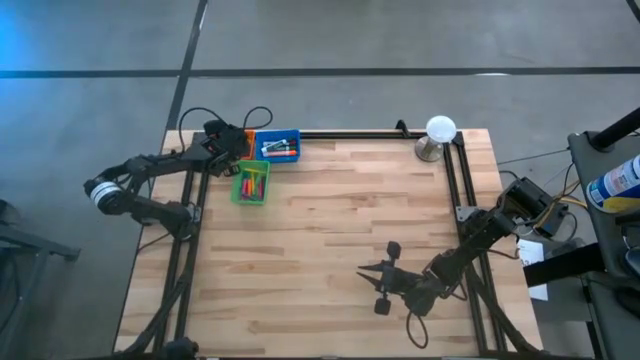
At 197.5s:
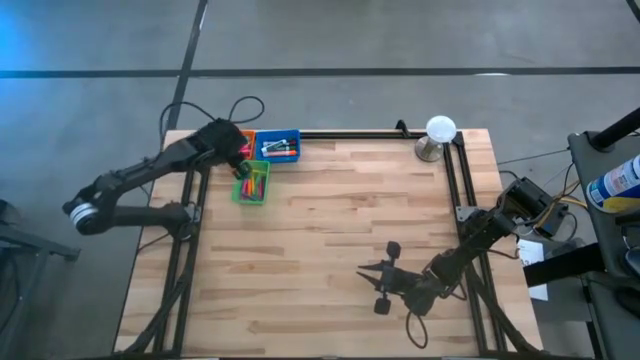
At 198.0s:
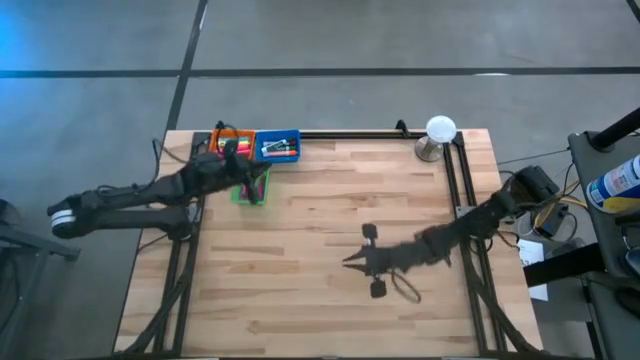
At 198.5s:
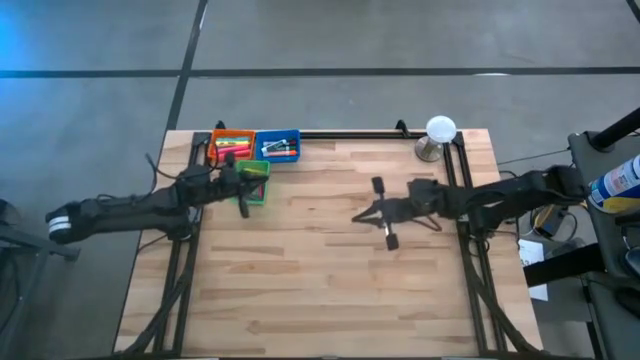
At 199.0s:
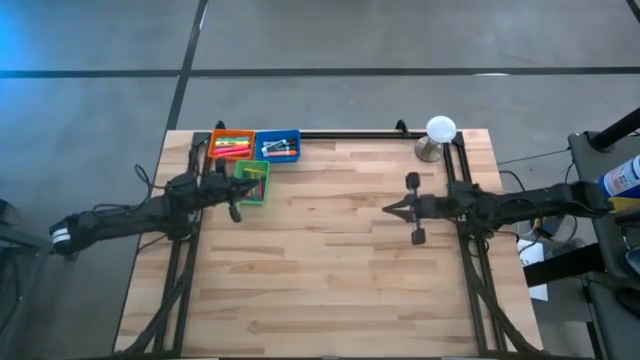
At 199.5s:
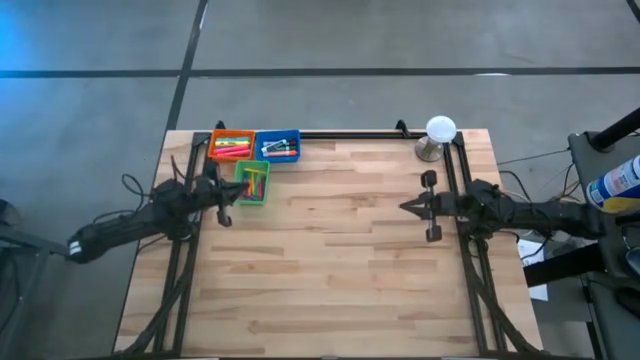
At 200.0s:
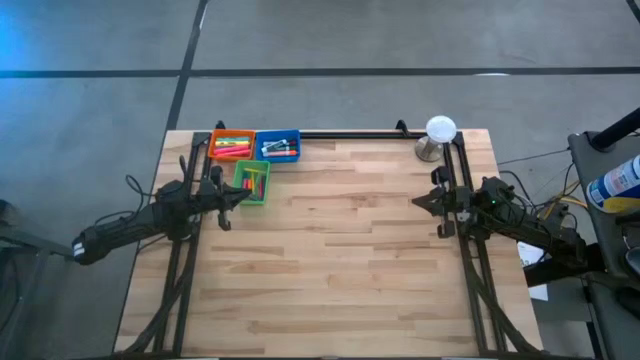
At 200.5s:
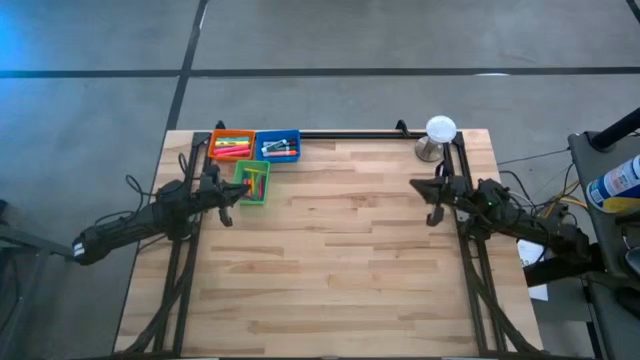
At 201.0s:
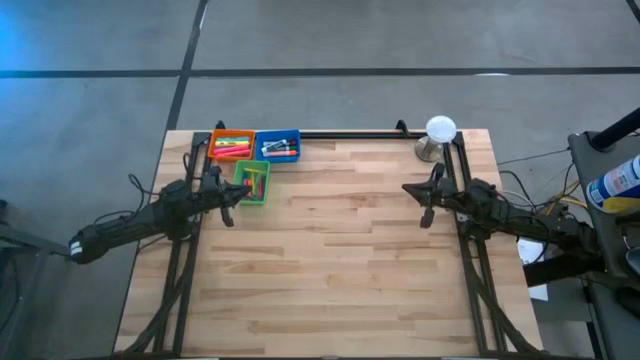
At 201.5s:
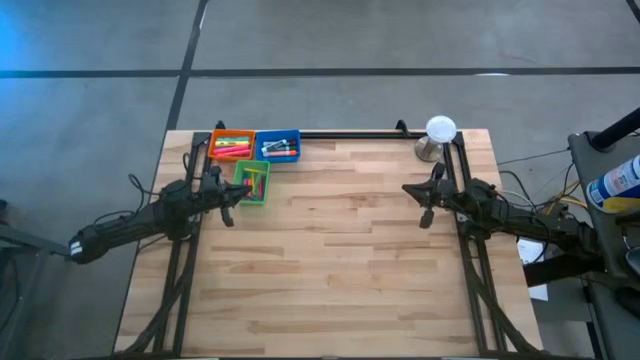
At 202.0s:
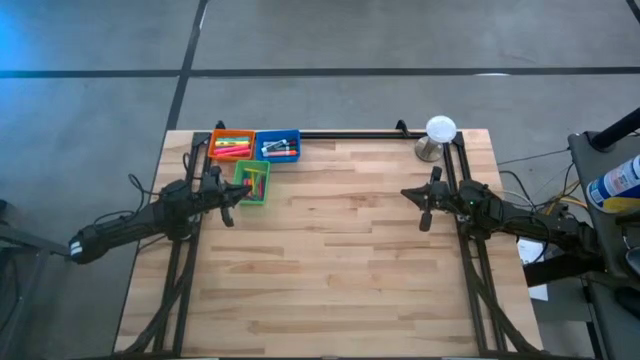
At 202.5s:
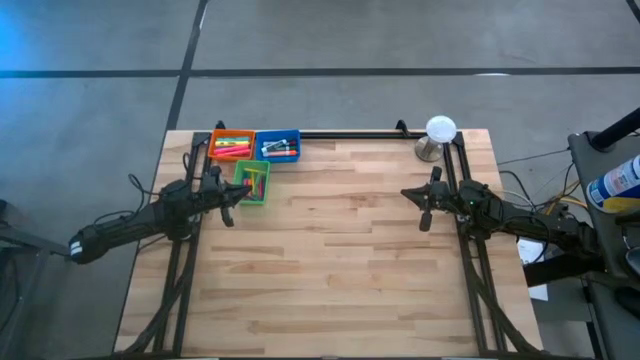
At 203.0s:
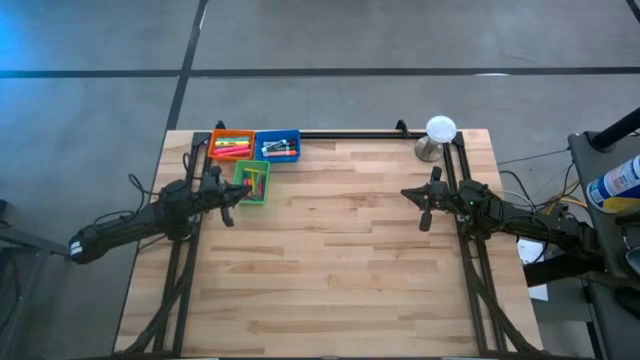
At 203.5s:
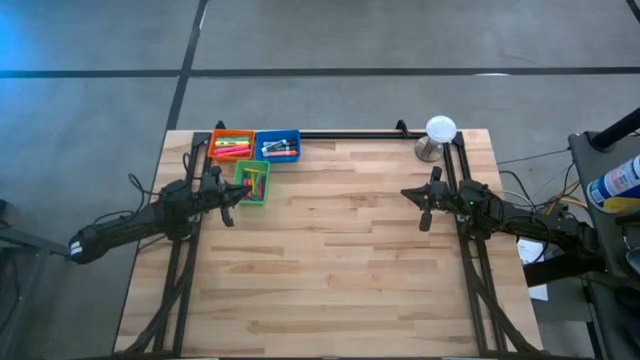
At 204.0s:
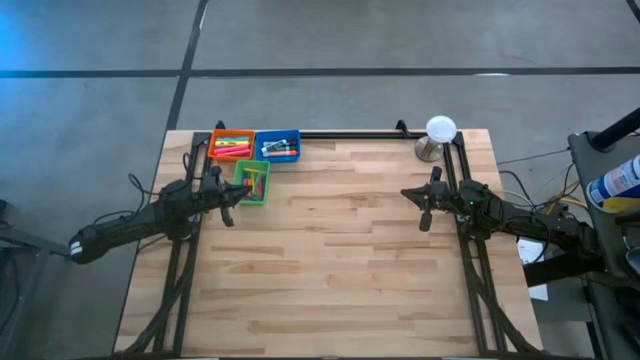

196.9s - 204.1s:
Task: Pick & Place Markers
Return to Home Position

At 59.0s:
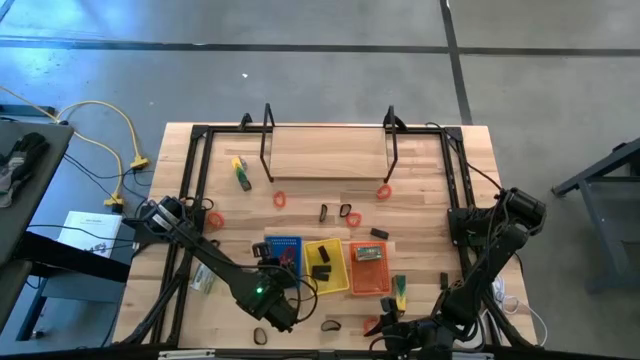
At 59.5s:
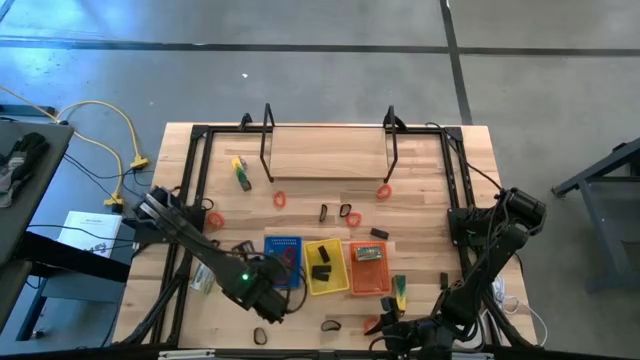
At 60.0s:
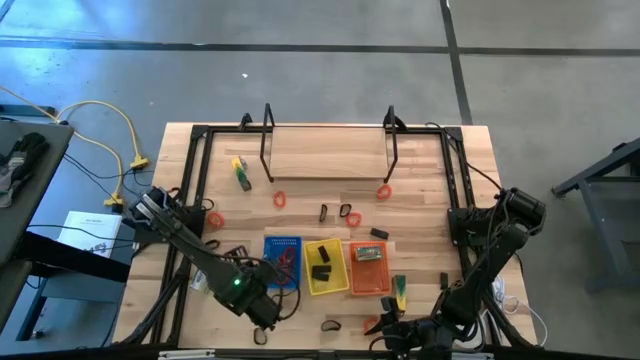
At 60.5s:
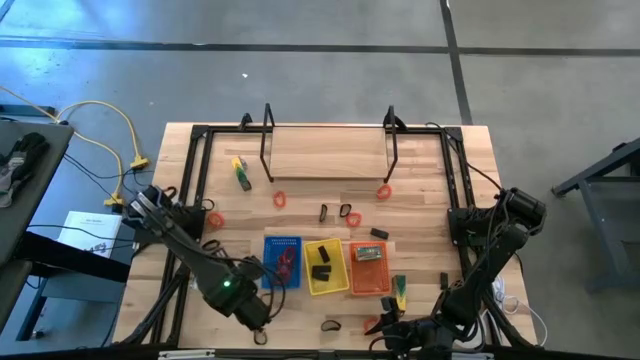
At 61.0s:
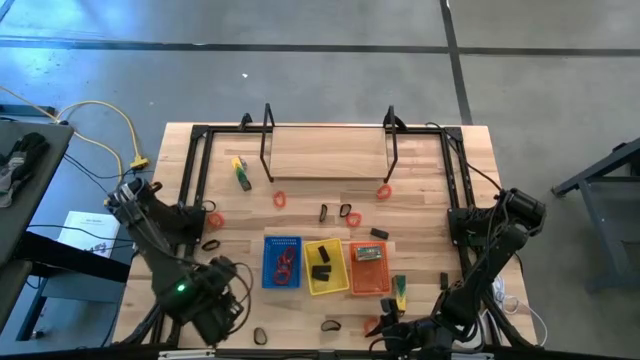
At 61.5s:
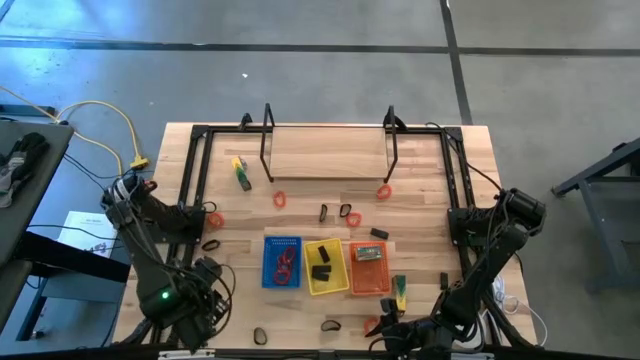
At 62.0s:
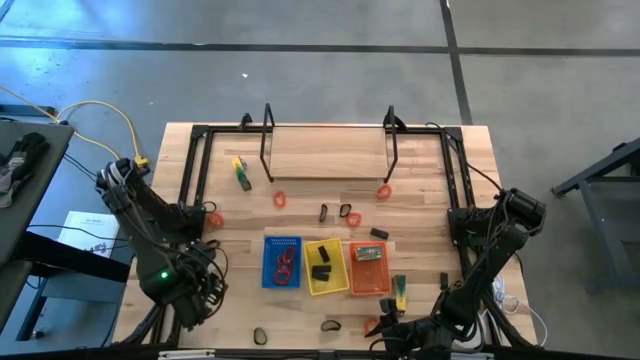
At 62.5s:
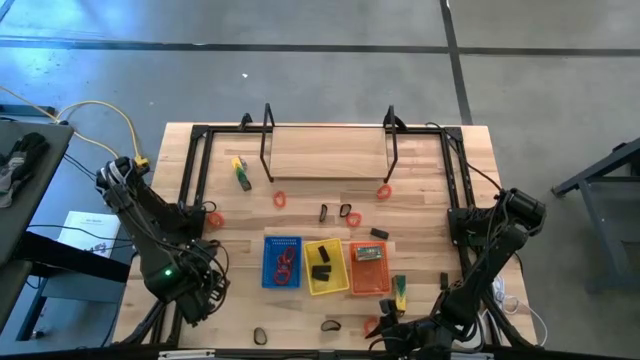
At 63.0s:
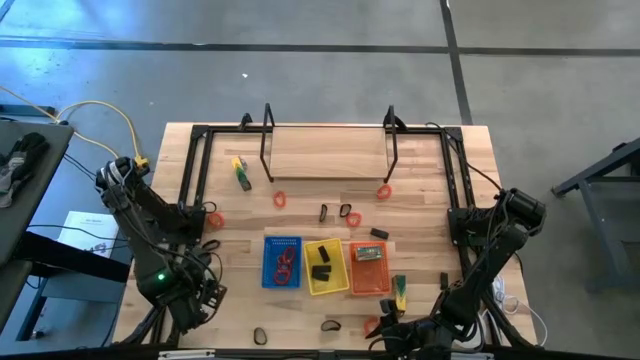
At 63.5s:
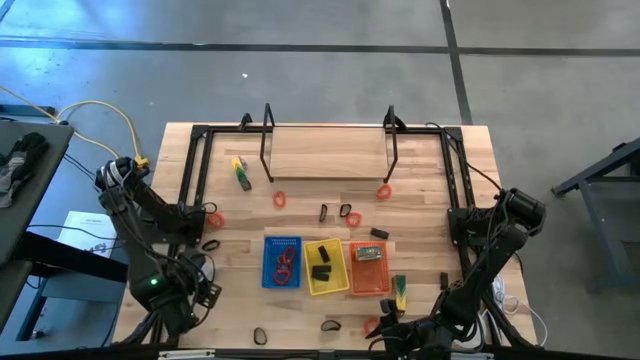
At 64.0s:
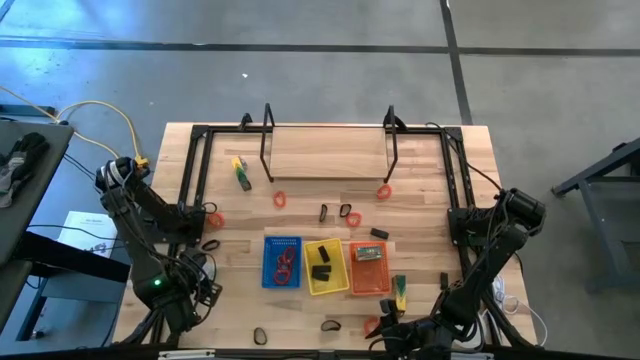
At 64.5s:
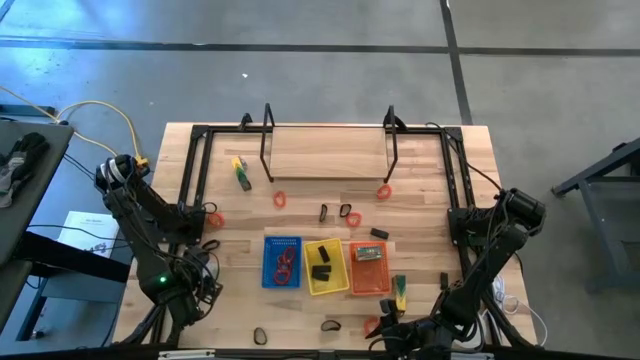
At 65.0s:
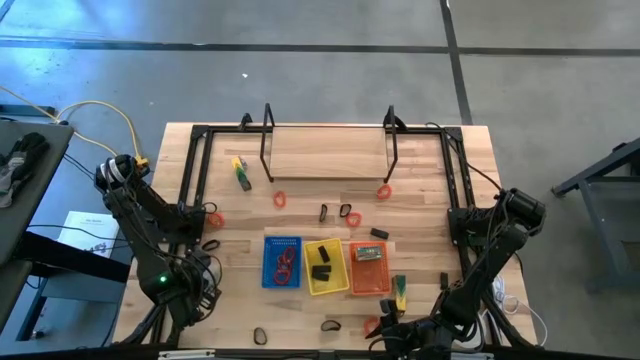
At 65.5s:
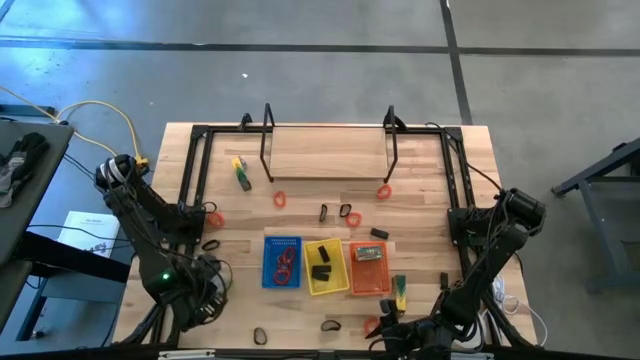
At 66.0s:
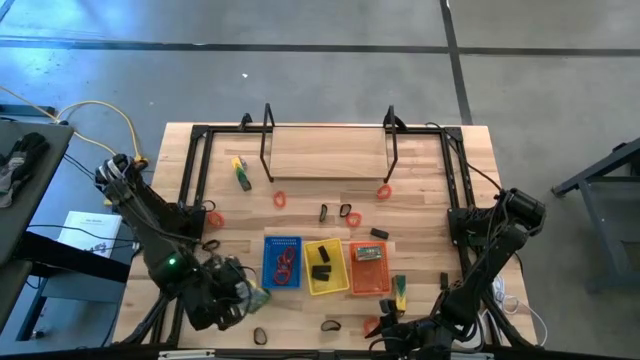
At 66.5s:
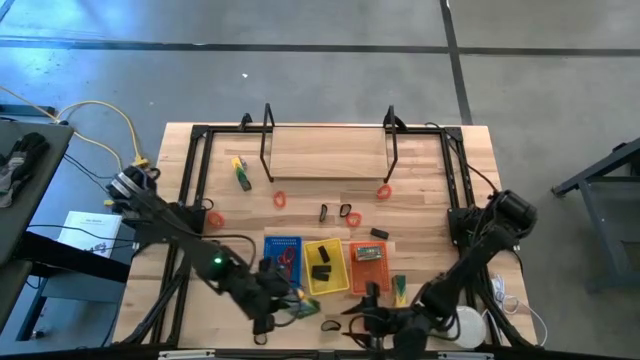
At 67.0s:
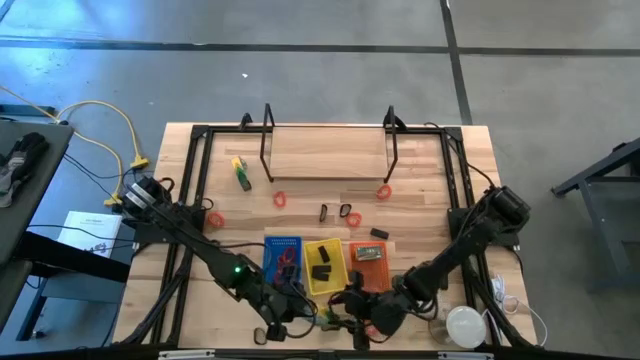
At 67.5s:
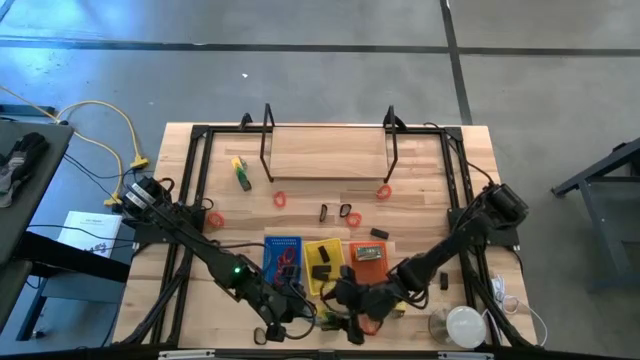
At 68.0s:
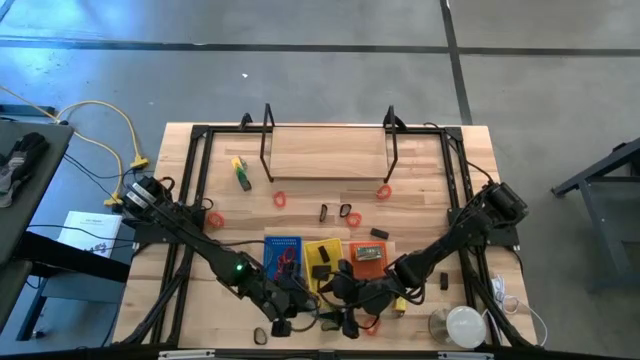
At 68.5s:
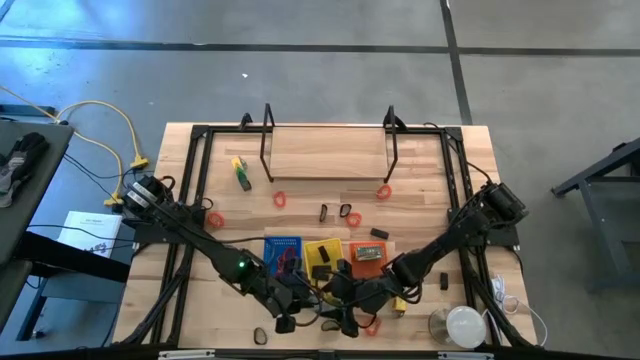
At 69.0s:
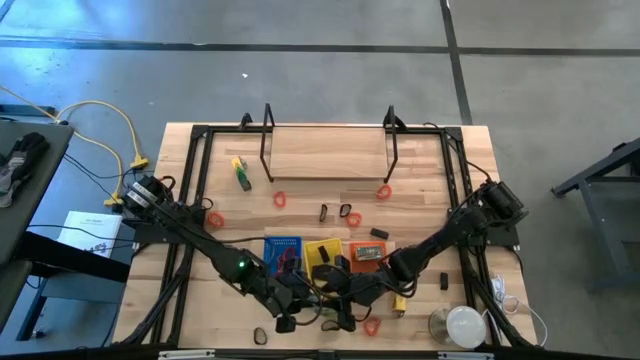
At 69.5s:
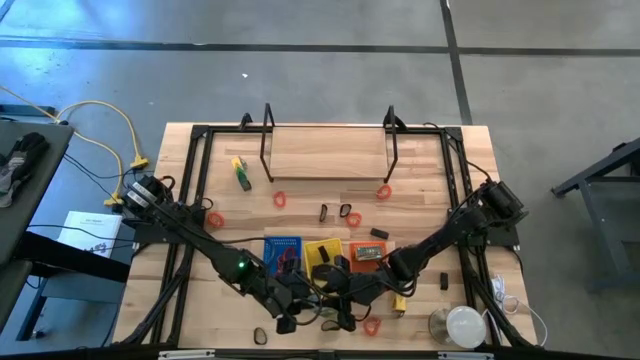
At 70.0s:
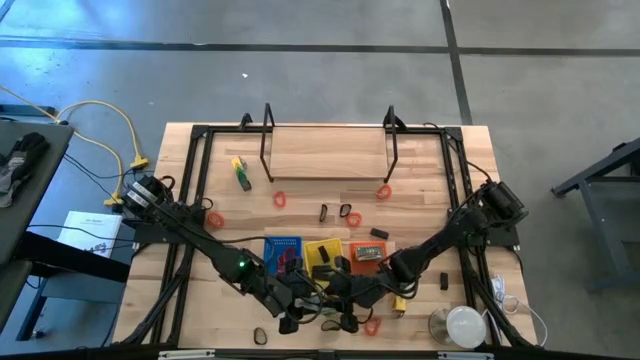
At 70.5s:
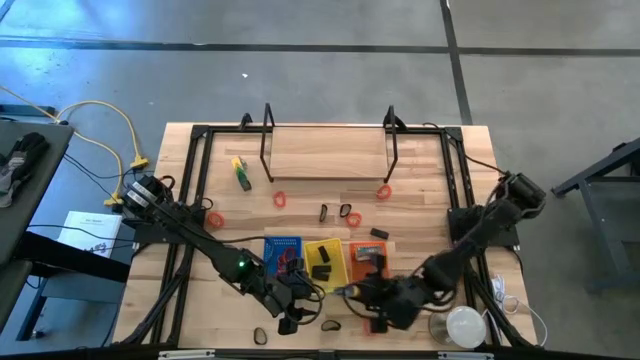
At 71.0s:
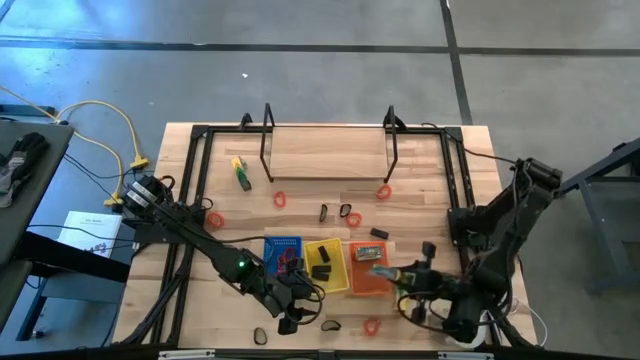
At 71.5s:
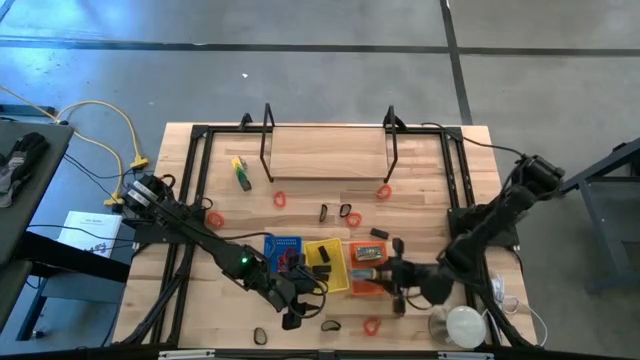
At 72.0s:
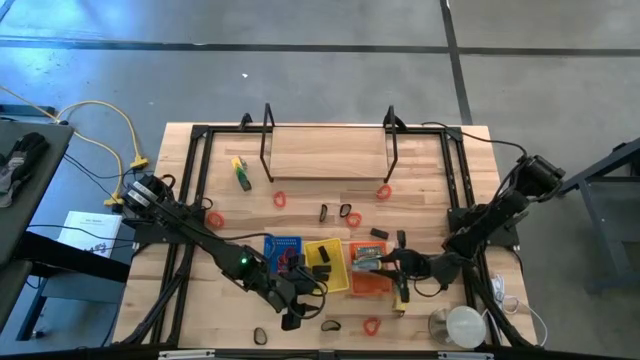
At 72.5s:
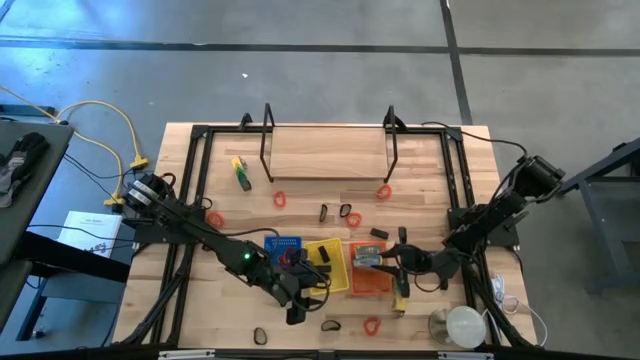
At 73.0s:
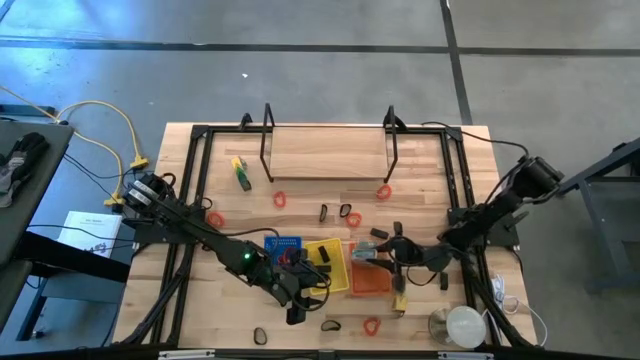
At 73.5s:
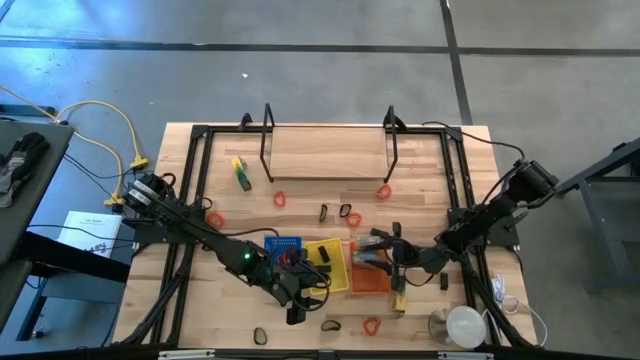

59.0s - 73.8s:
Task: Pick & Place Office Desk Supplies
Put the crayon box into the orange basket
